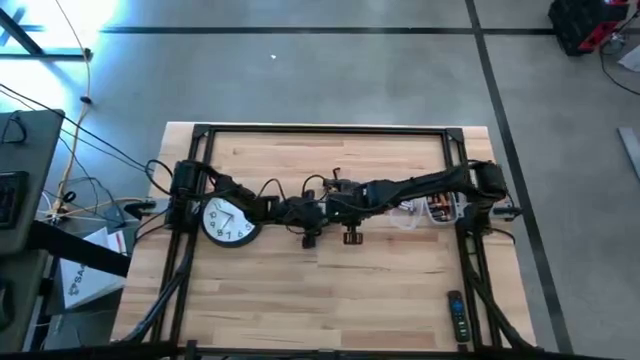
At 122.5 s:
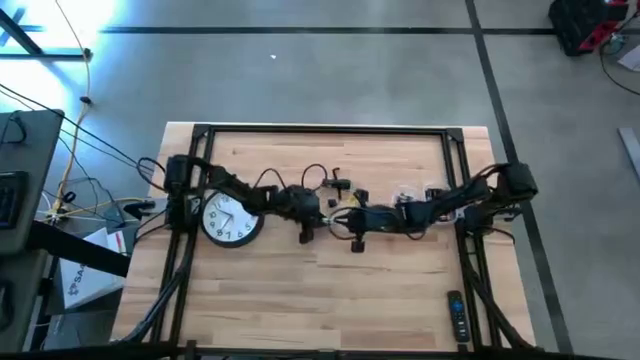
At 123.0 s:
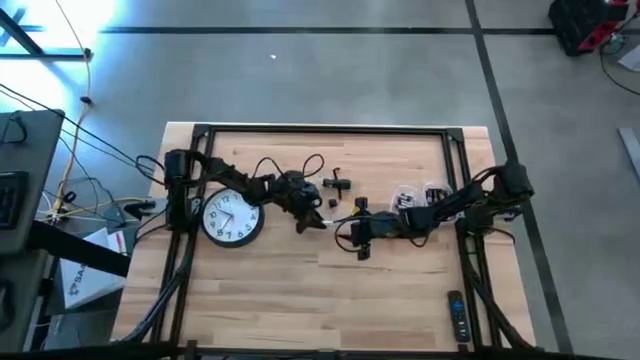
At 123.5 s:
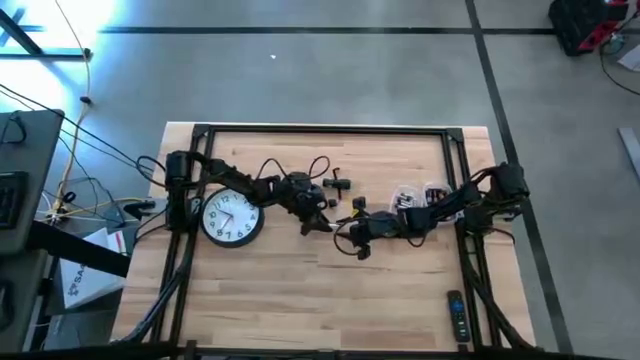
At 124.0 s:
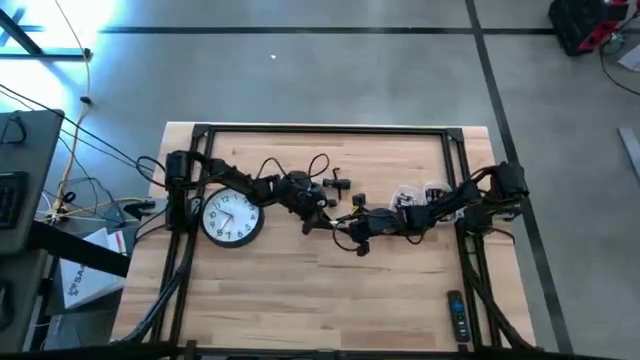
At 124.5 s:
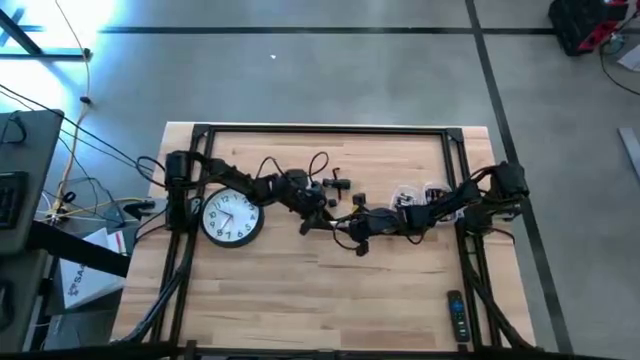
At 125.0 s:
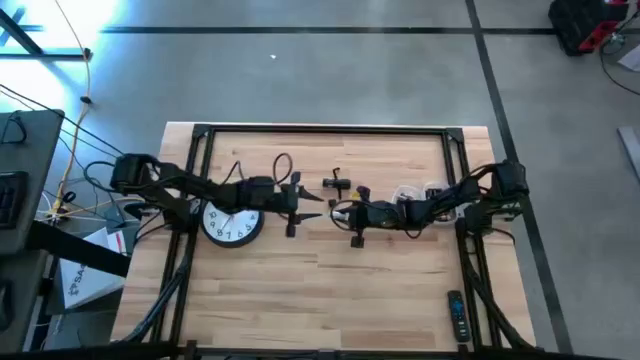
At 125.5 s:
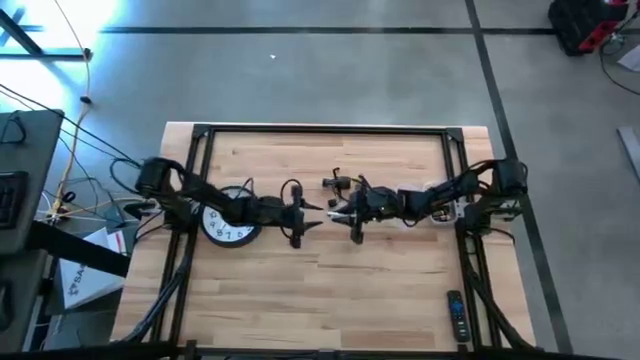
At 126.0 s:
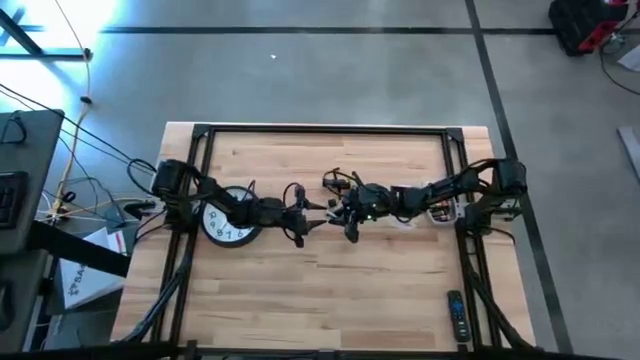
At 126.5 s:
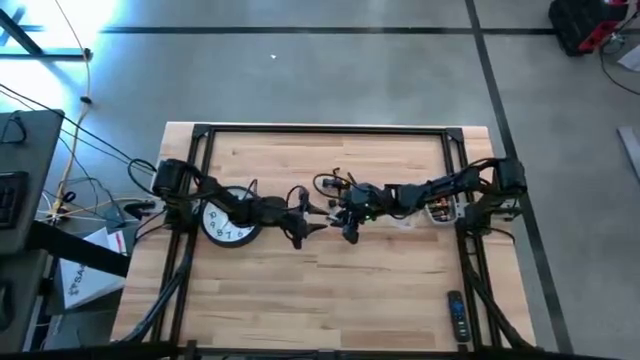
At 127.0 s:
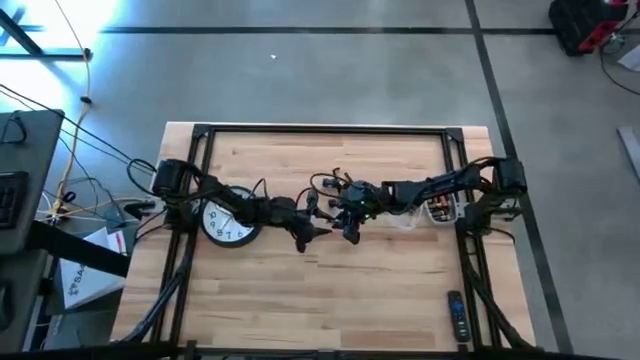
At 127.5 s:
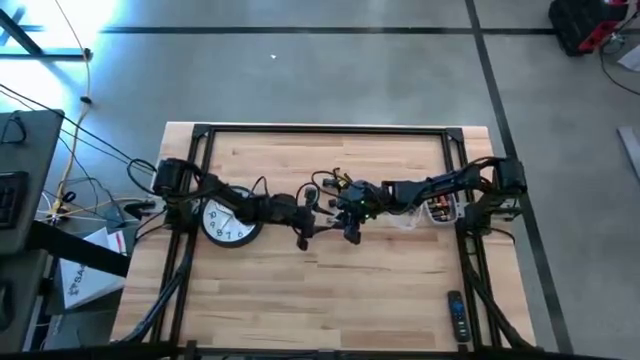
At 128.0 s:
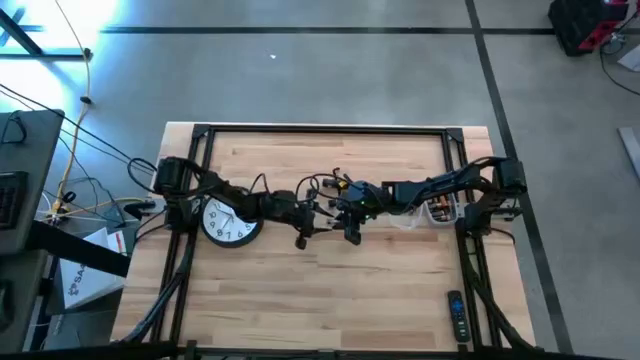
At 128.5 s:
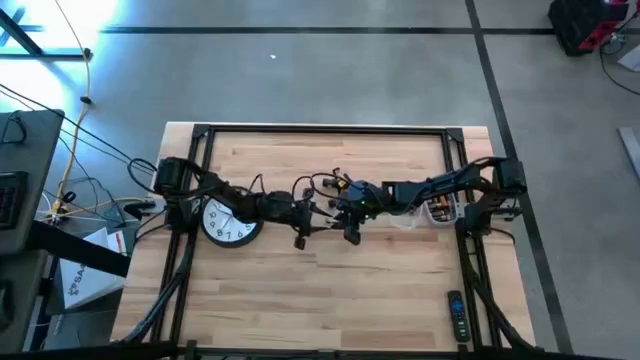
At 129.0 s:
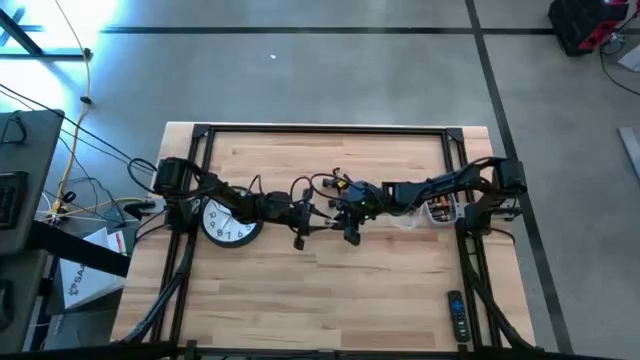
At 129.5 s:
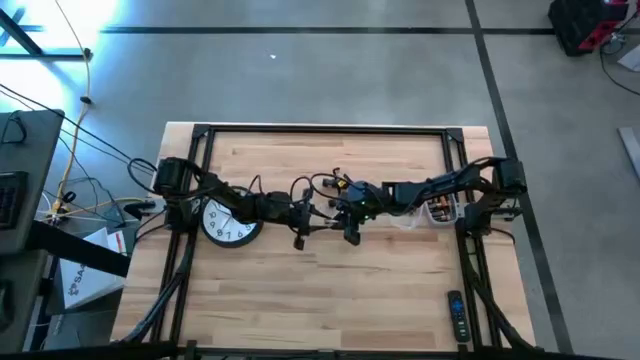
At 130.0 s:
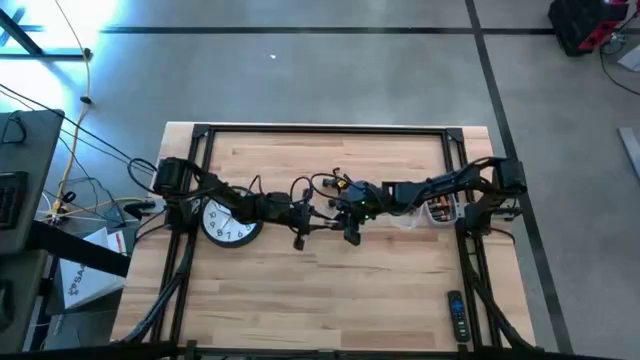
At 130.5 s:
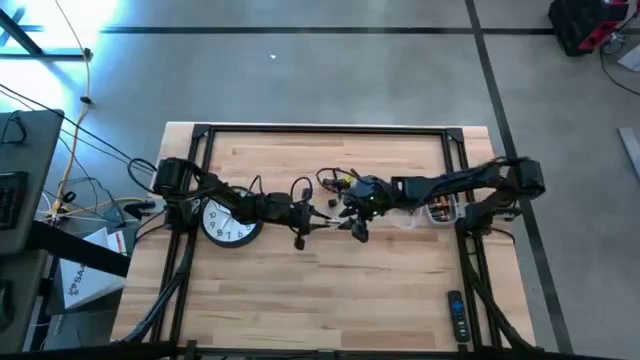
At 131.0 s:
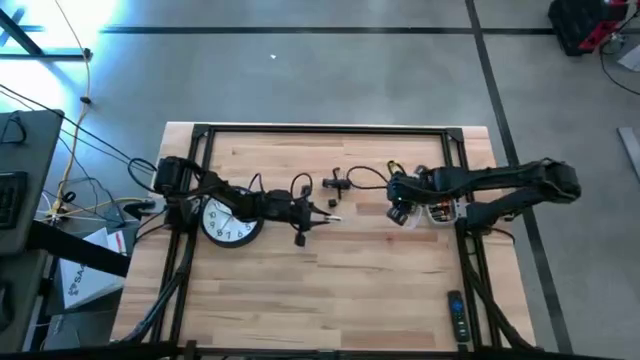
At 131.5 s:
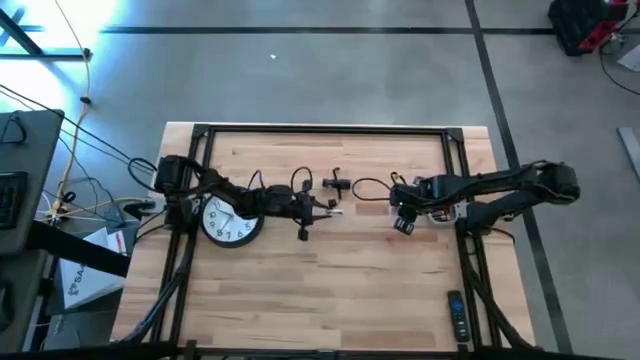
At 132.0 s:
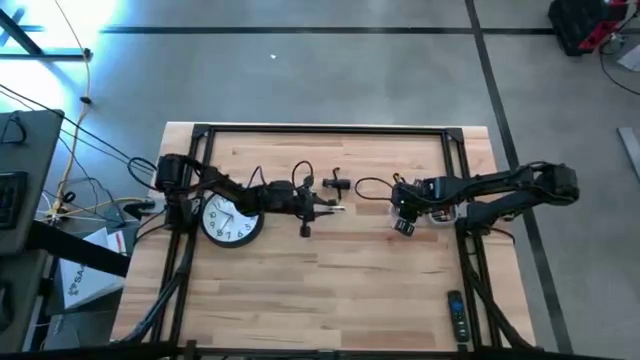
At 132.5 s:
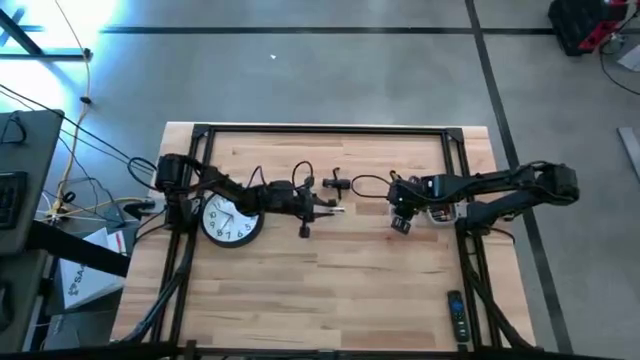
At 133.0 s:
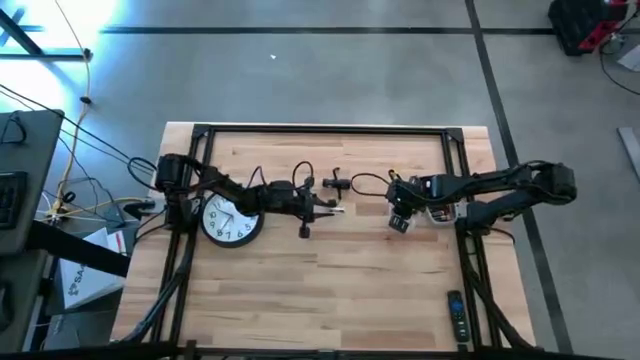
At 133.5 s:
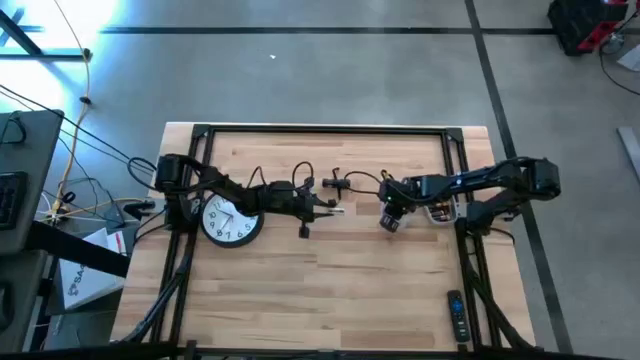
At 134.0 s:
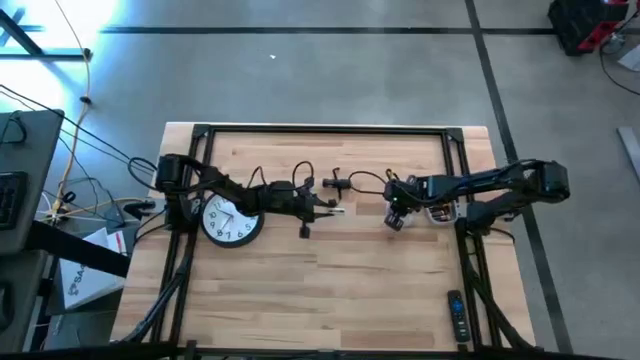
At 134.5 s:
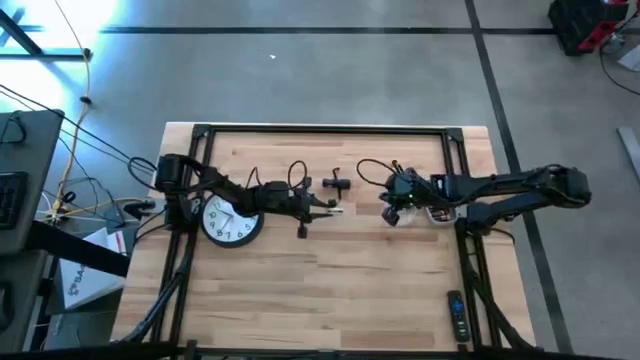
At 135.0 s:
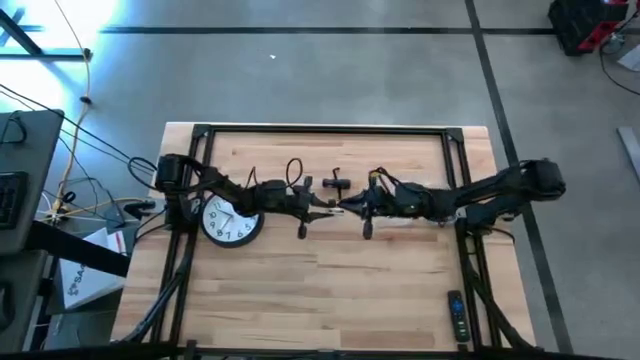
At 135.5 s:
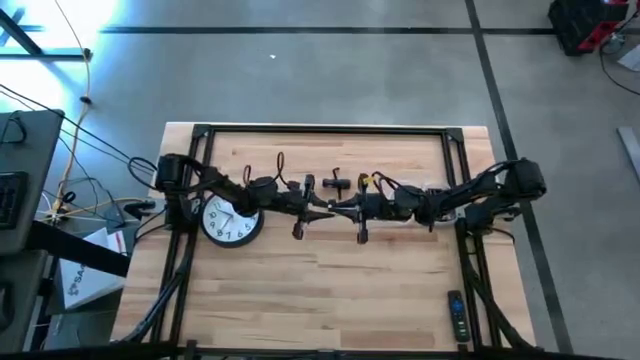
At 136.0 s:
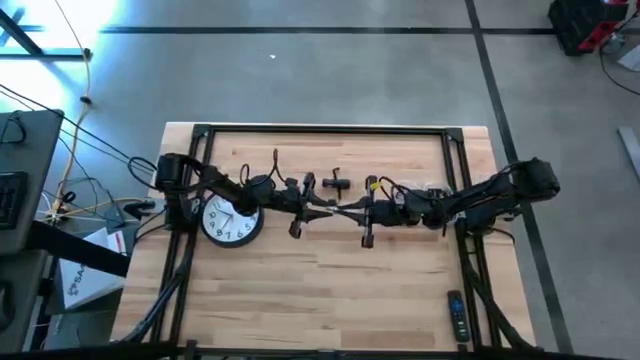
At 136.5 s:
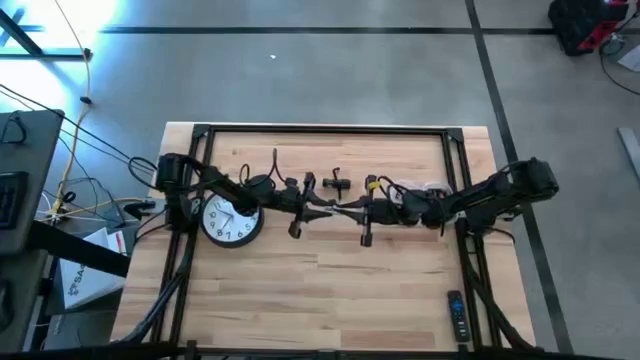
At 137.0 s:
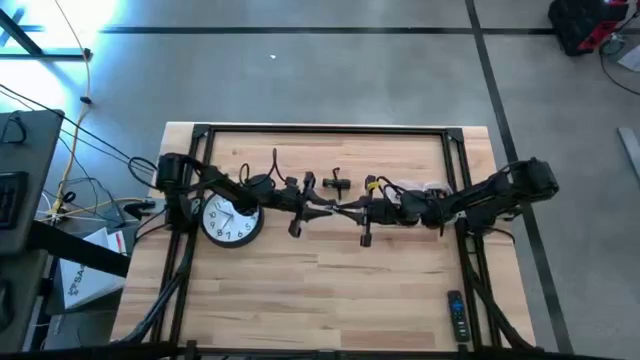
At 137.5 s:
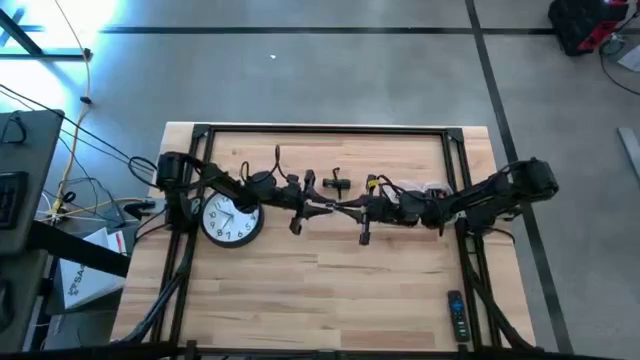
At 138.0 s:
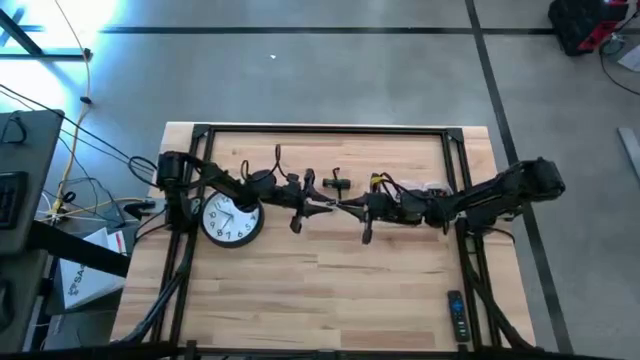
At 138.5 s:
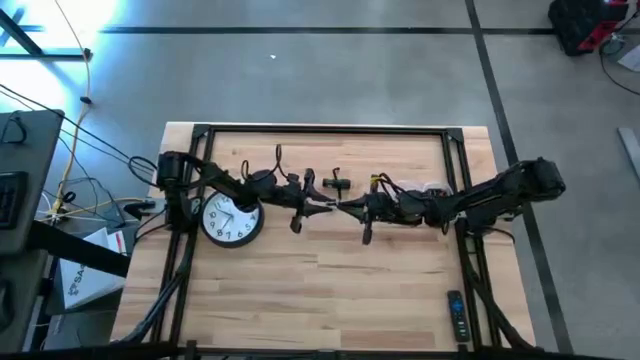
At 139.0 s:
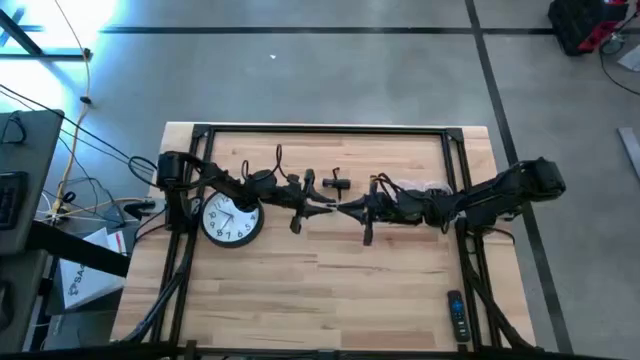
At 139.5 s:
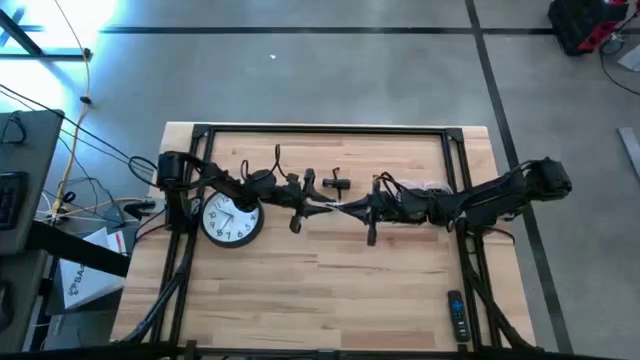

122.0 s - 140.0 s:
Task: Insert battery
Insert the silver battery into the white battery case

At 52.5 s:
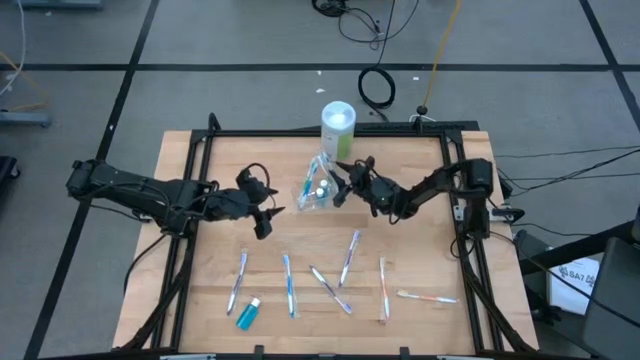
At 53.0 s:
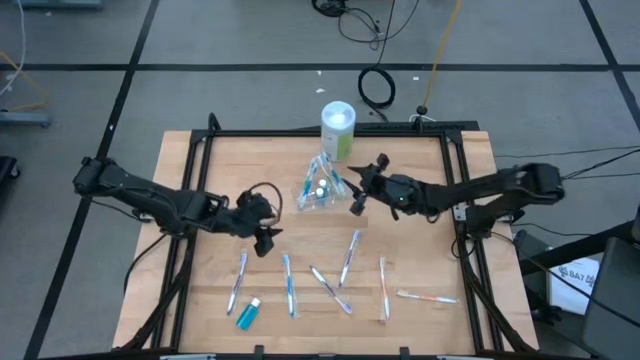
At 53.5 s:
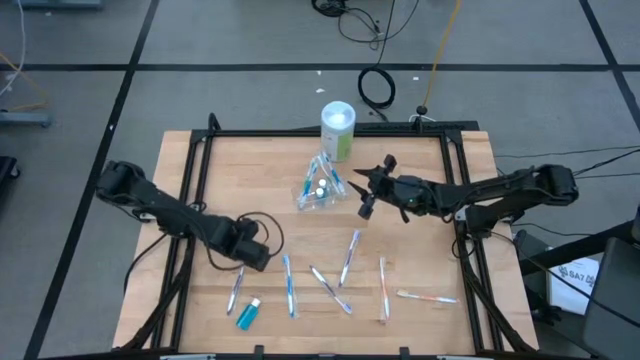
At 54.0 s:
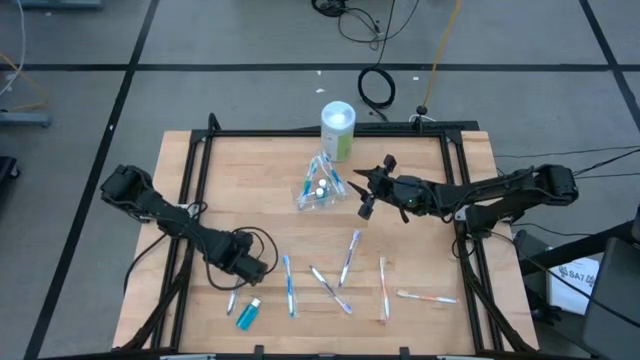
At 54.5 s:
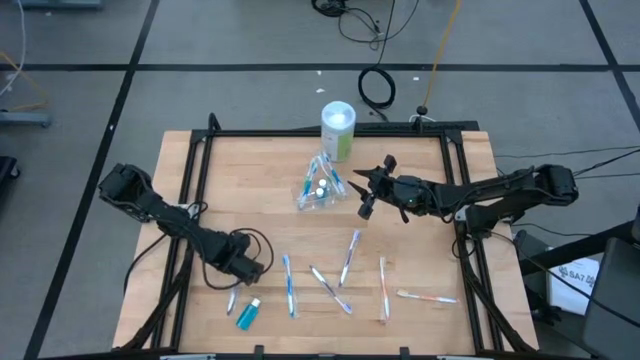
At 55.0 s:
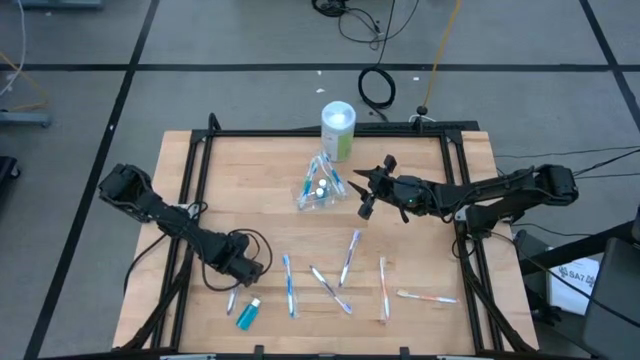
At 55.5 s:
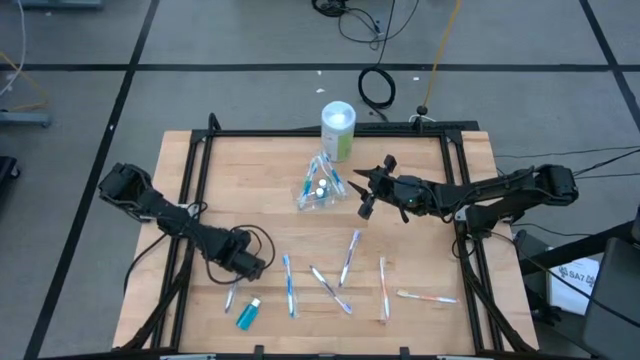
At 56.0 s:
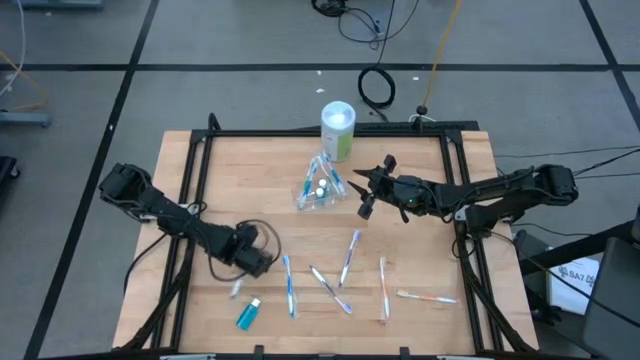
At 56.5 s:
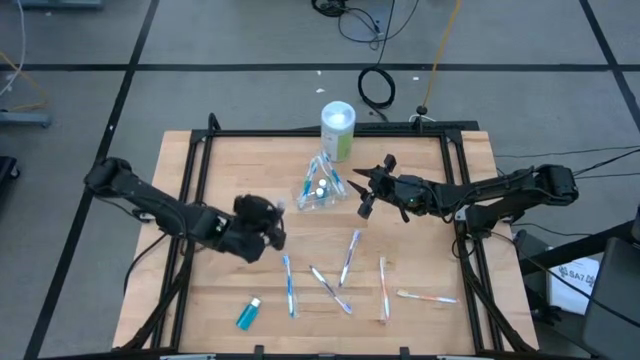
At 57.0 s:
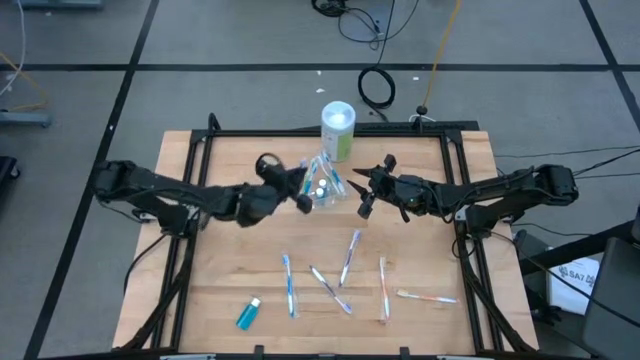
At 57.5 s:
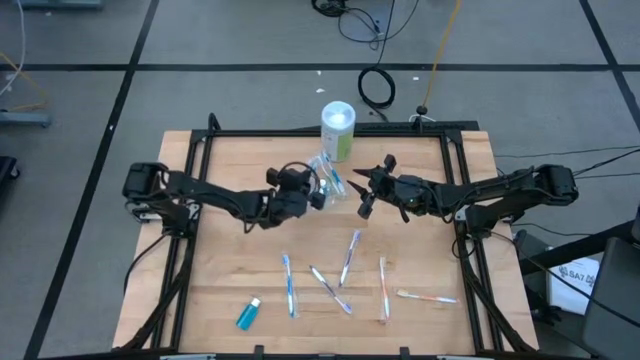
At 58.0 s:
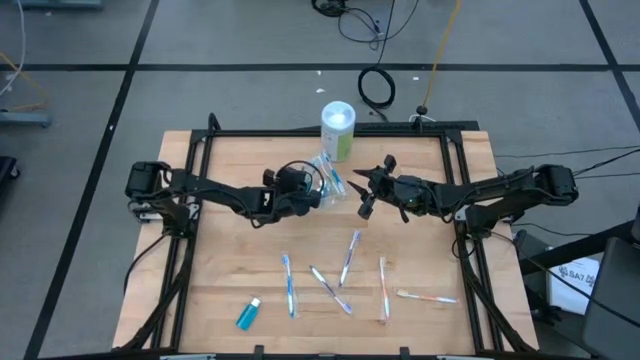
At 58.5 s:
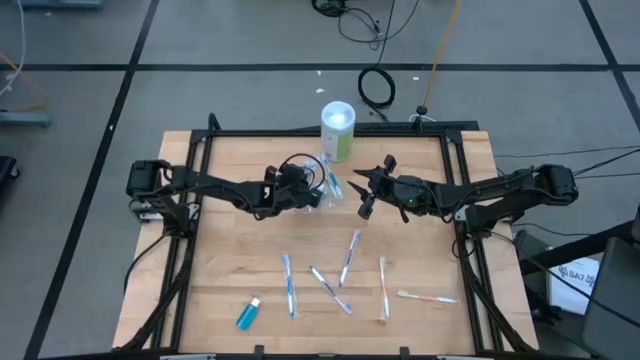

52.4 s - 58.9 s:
Task: Pick & Place toothbrushing station
Put the bottom left violet toothbrush into the transparent organizer
